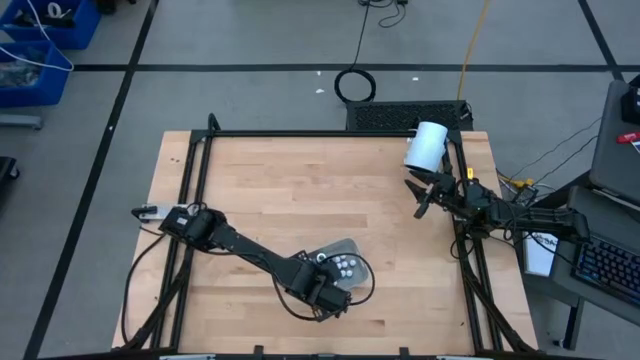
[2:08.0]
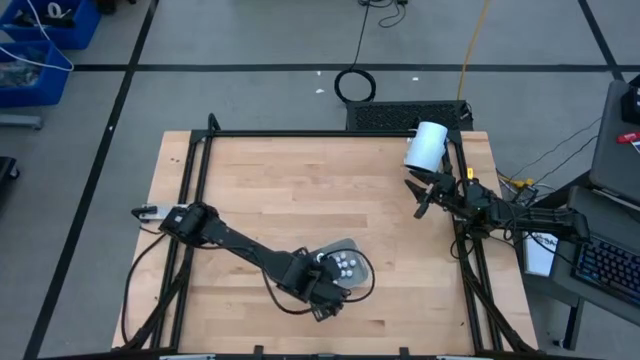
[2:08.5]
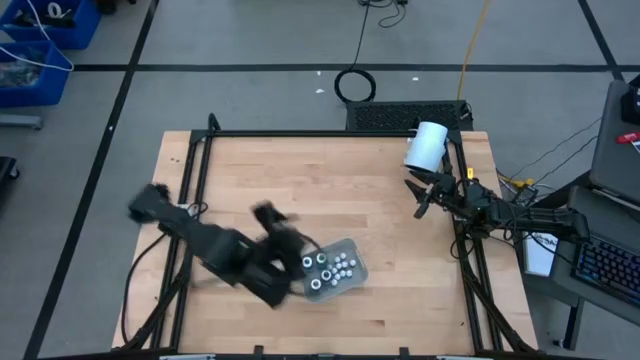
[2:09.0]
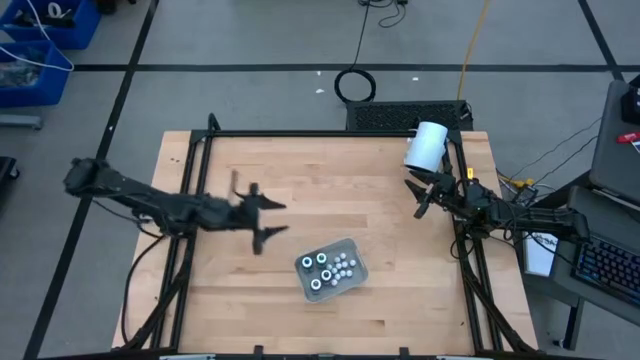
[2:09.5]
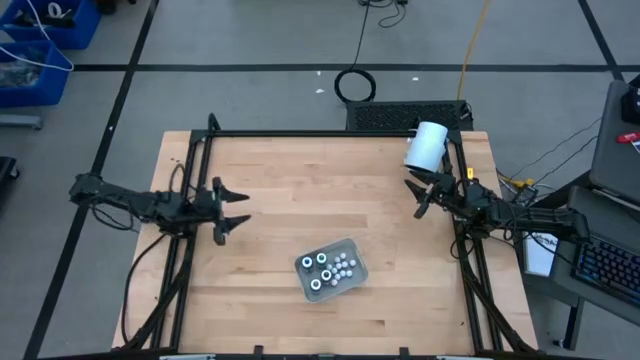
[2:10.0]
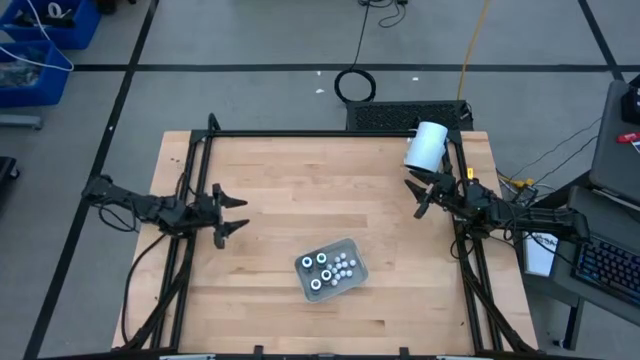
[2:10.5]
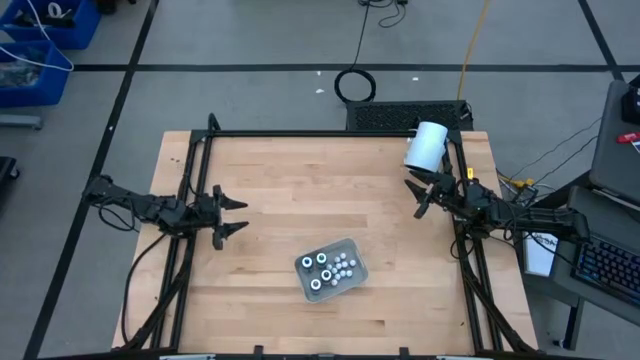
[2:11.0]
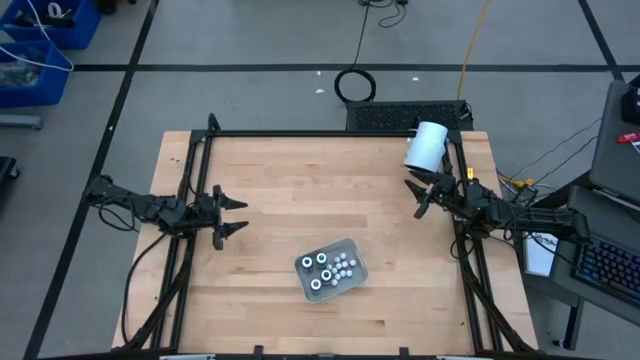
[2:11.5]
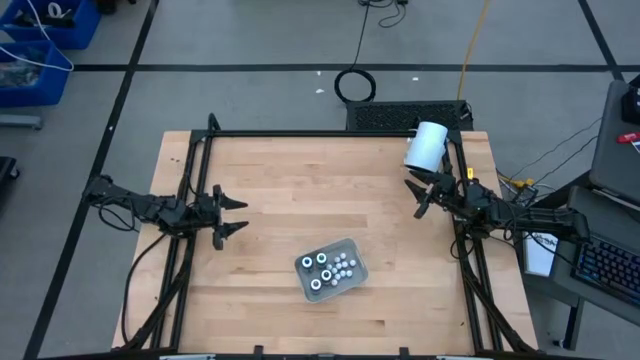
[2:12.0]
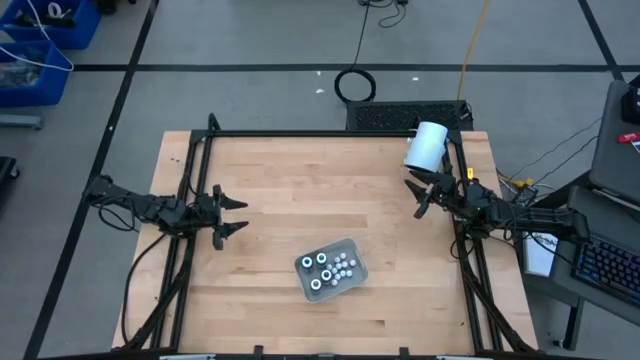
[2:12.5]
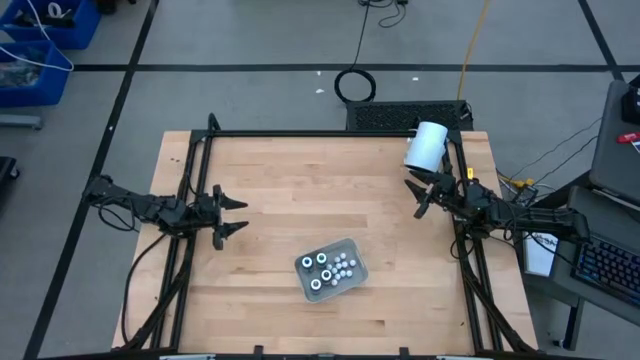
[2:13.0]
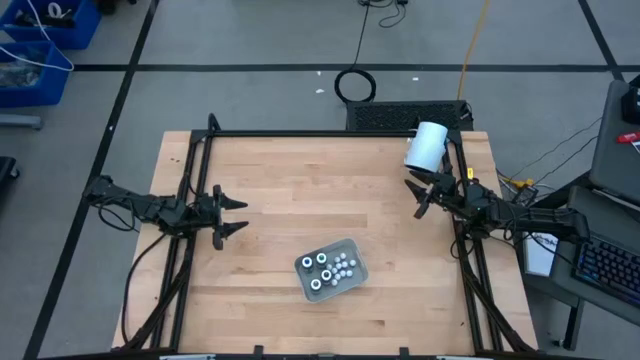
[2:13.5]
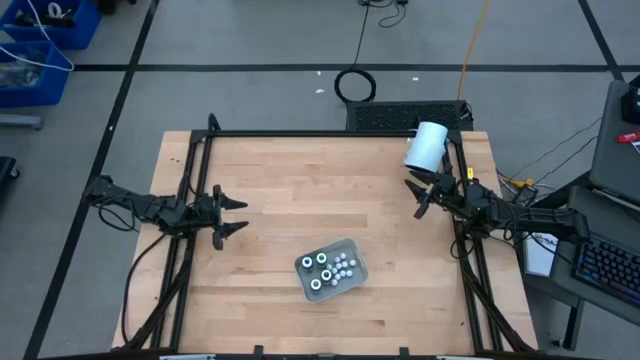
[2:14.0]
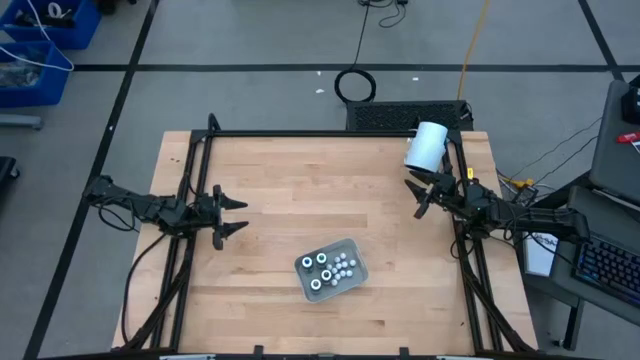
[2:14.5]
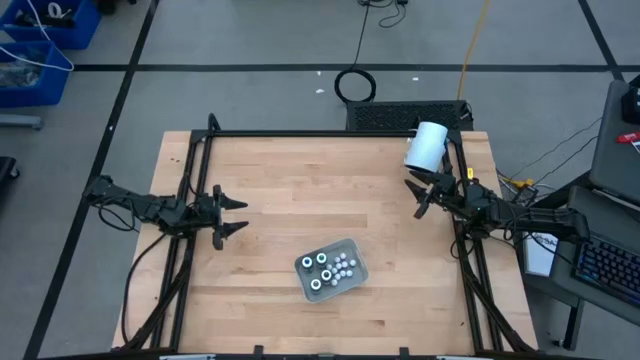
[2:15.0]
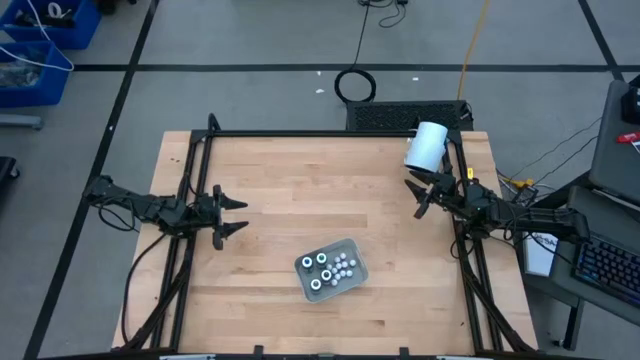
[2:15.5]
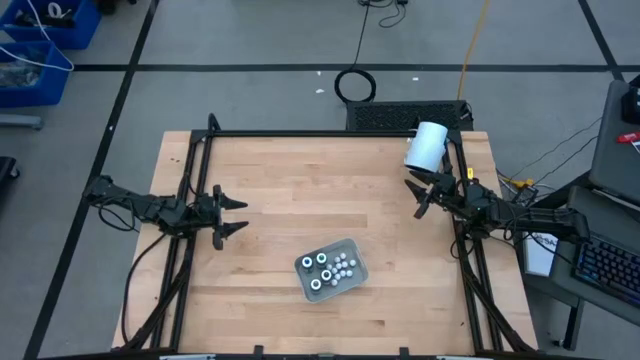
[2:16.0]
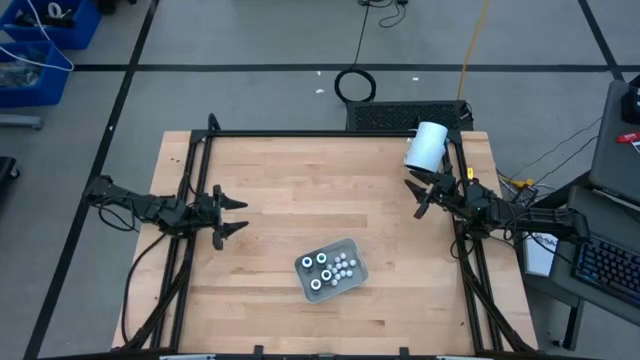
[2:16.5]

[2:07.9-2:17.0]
Task: Pick & Place food coloring
Return to Home Position

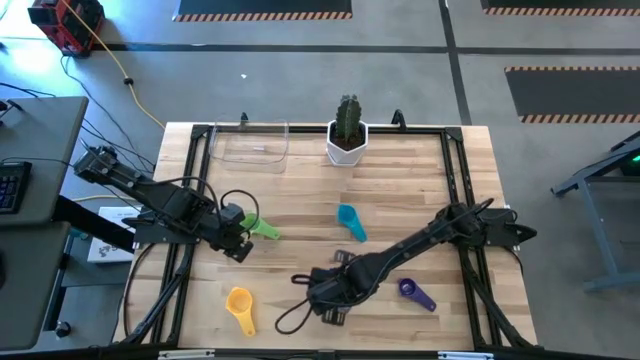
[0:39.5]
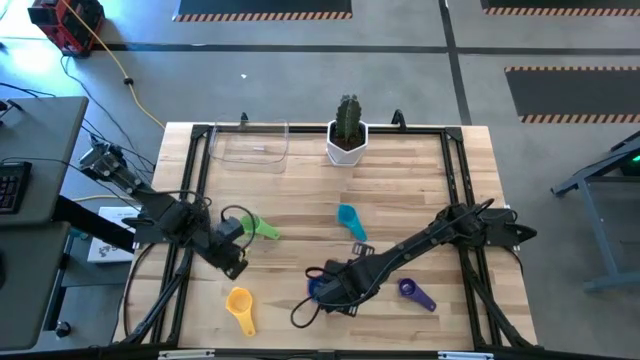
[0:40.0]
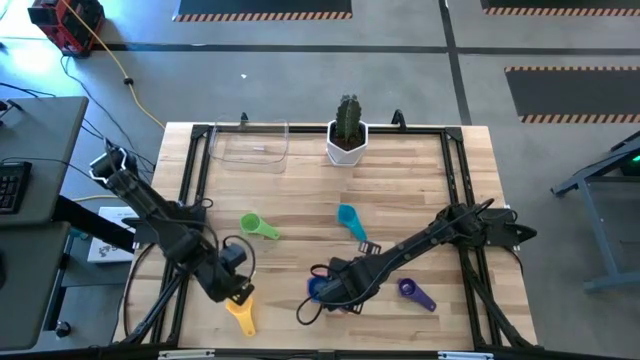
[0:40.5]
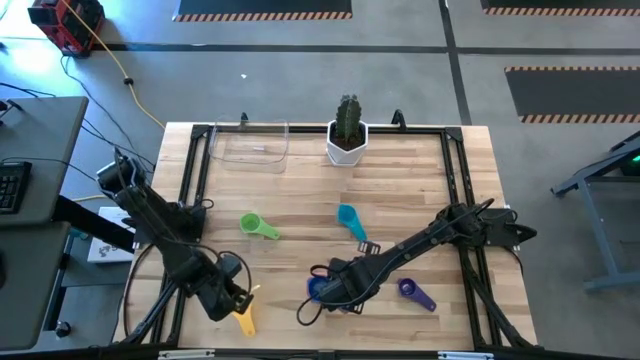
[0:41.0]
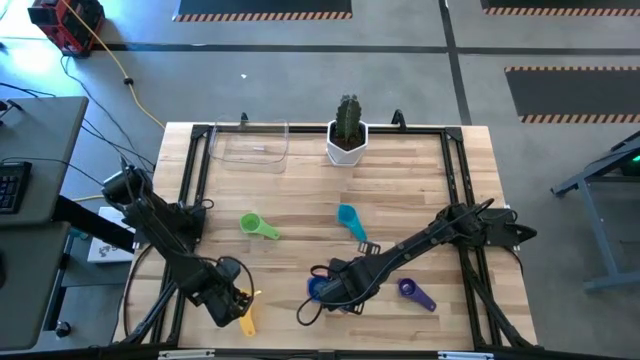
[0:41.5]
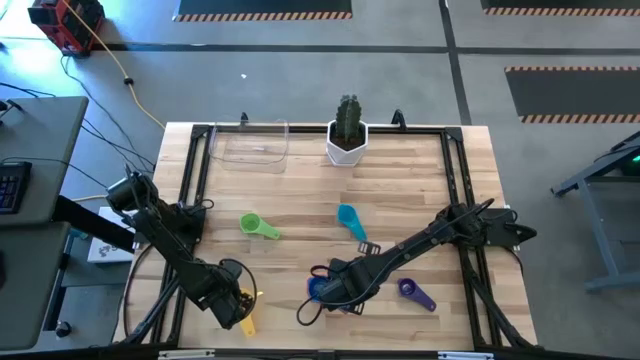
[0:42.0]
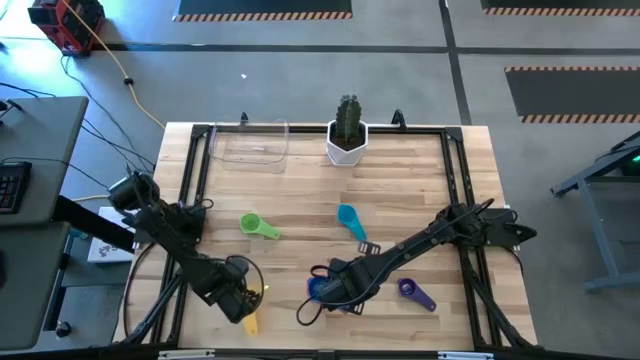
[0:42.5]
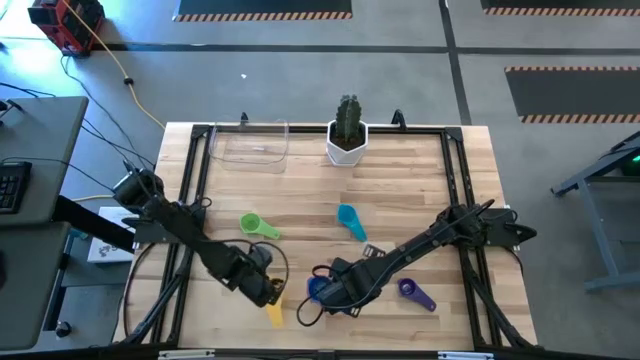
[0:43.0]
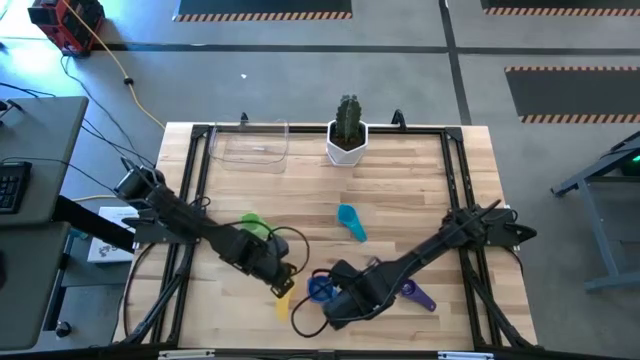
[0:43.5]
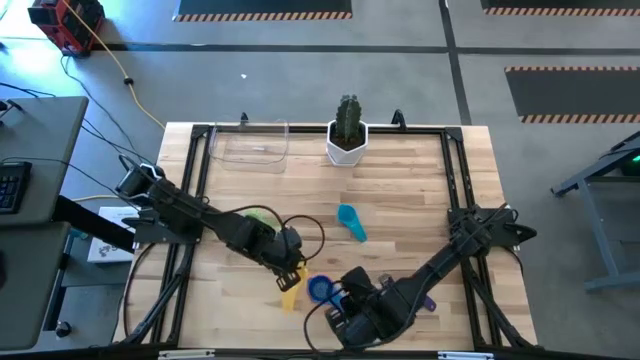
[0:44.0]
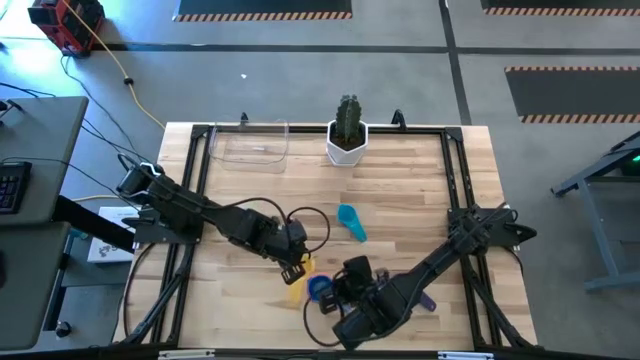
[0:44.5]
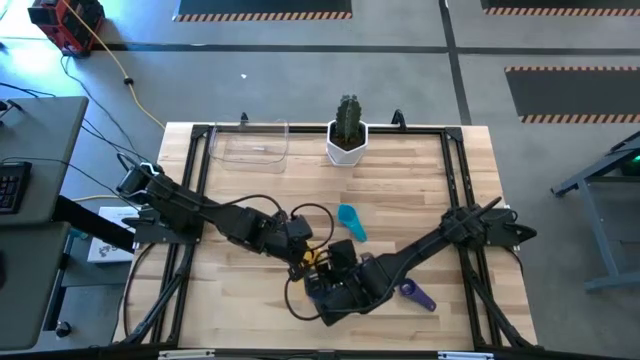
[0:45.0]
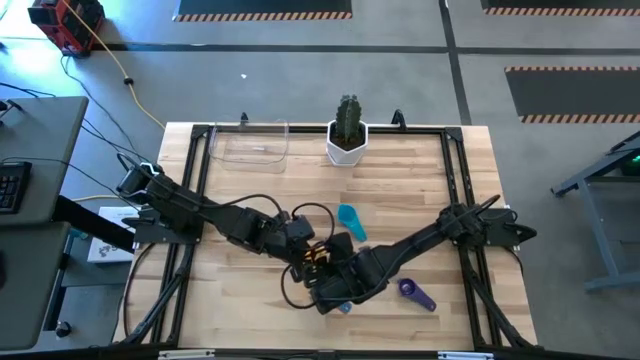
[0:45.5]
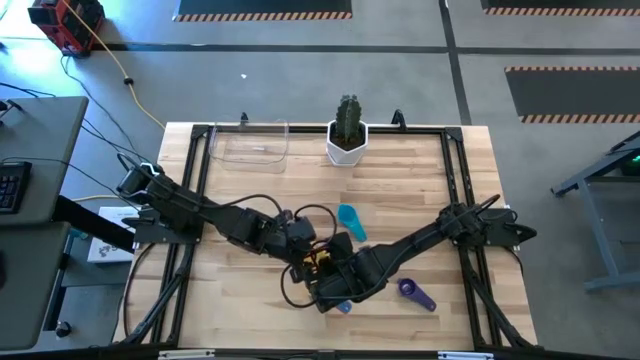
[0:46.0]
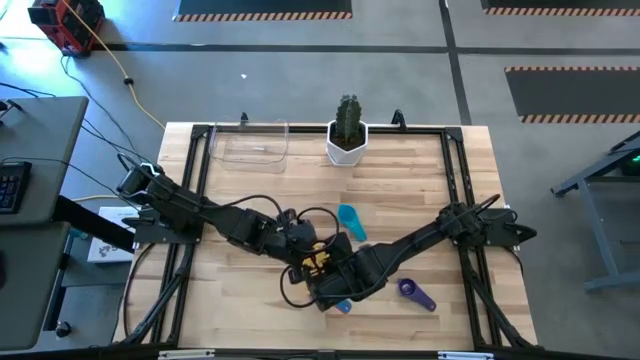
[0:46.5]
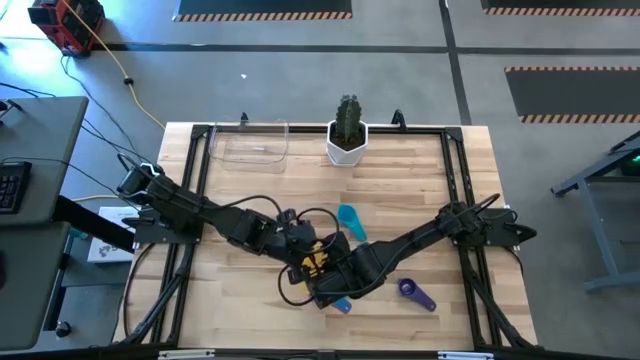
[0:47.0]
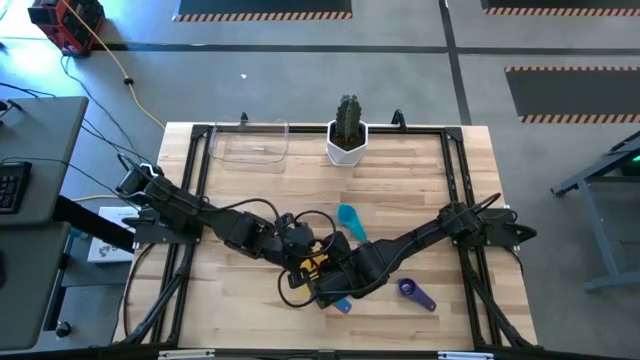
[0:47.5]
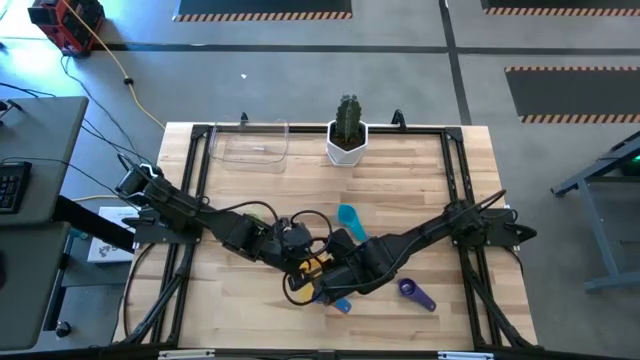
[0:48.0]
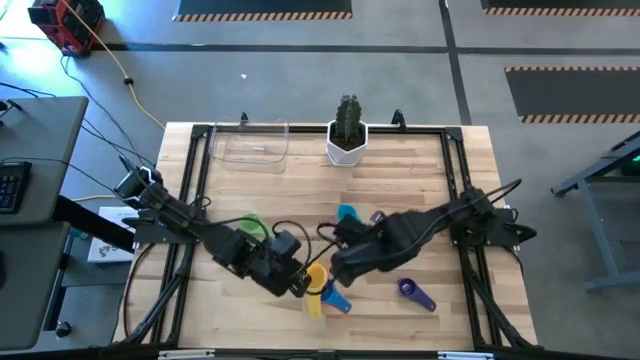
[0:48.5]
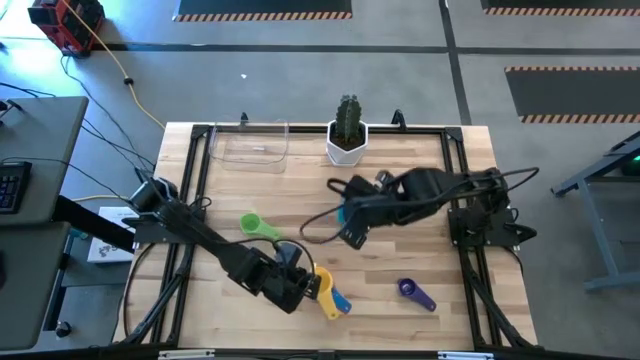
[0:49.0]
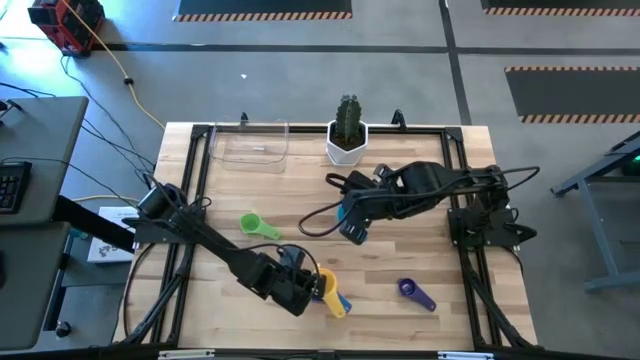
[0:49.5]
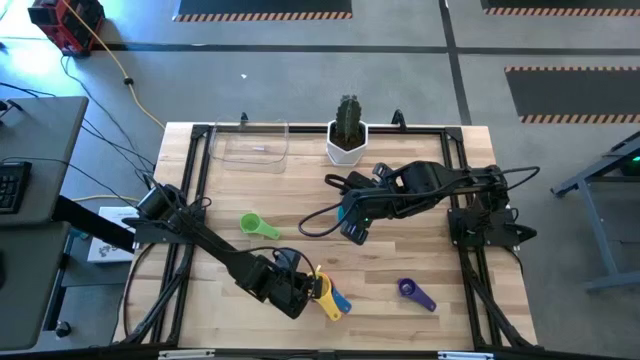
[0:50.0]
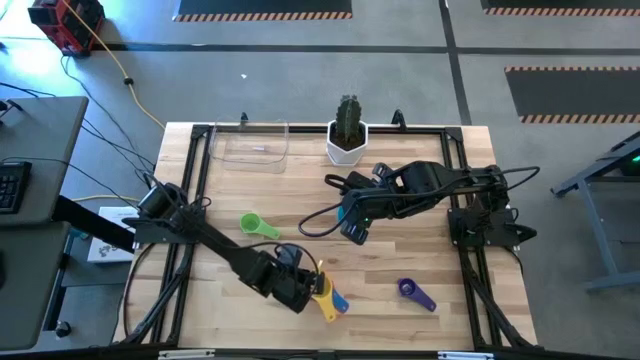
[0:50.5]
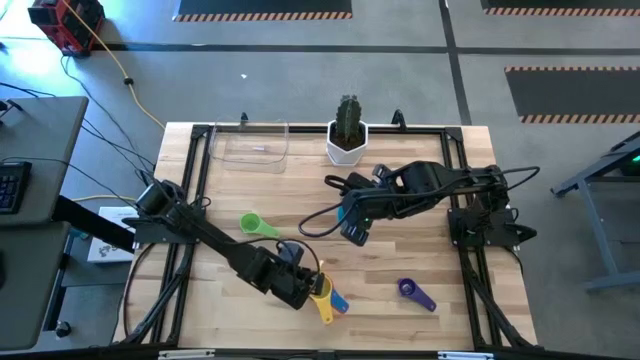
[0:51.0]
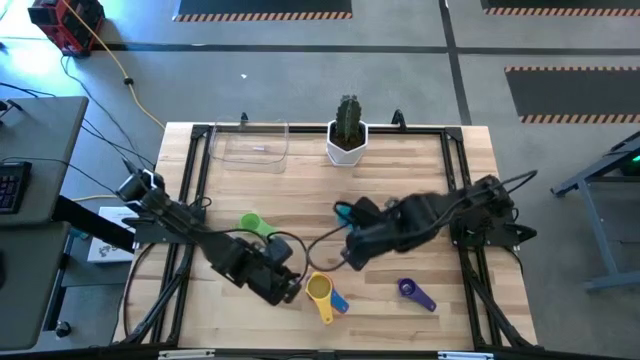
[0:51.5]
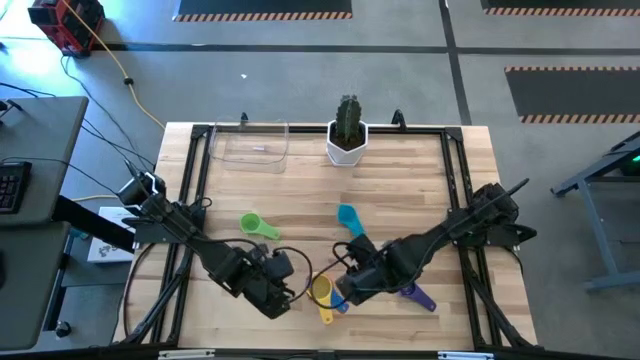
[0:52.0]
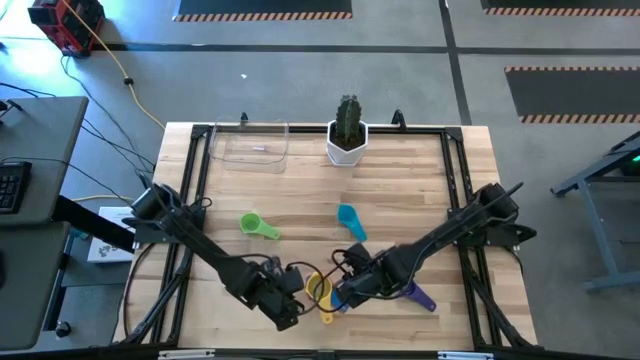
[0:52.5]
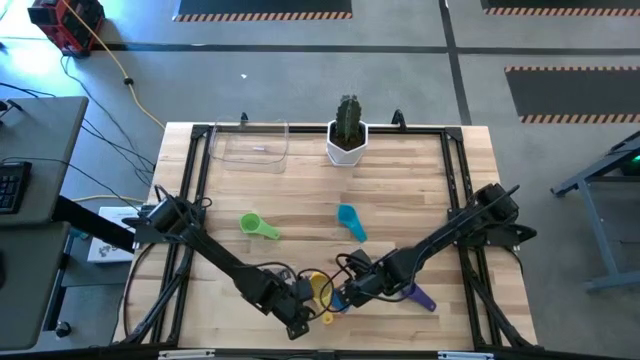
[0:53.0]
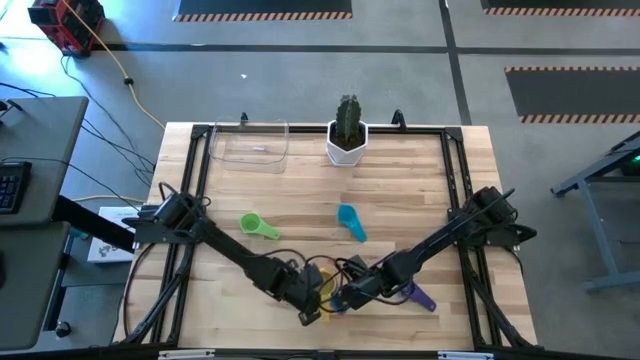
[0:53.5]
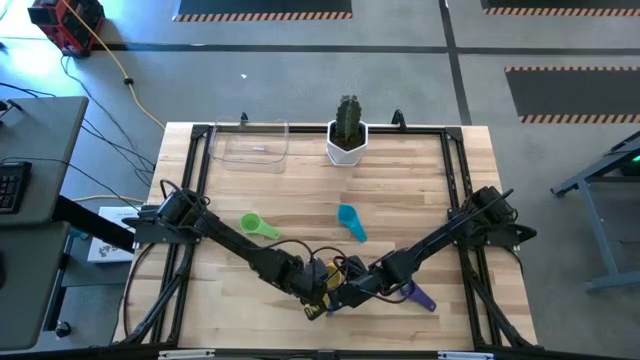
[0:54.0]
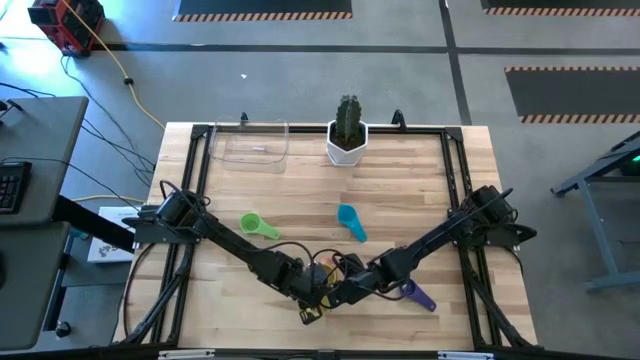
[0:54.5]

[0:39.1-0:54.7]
Task: Nest measuring cups in basket
Stack the yellow measuring cup on the dark blue measuring cup
